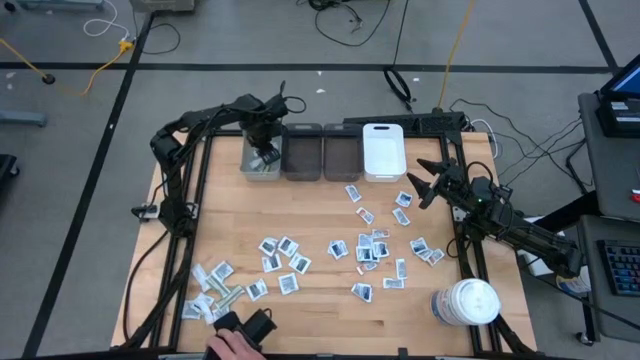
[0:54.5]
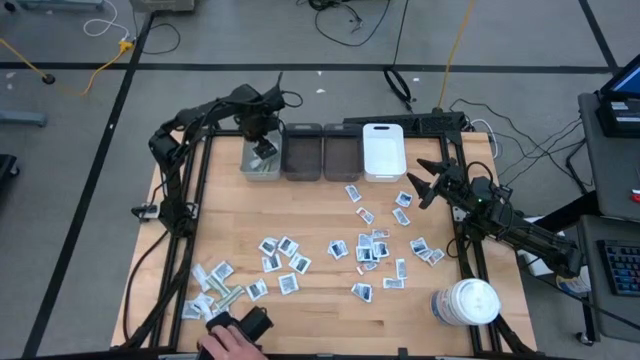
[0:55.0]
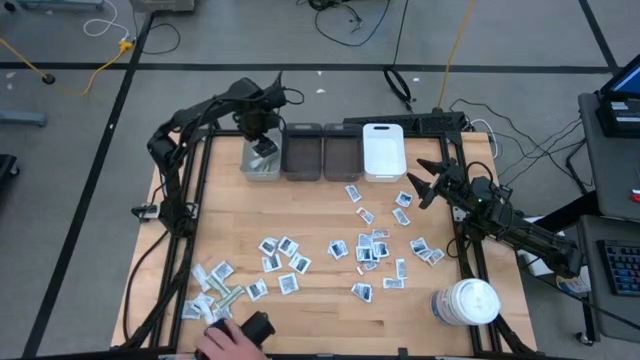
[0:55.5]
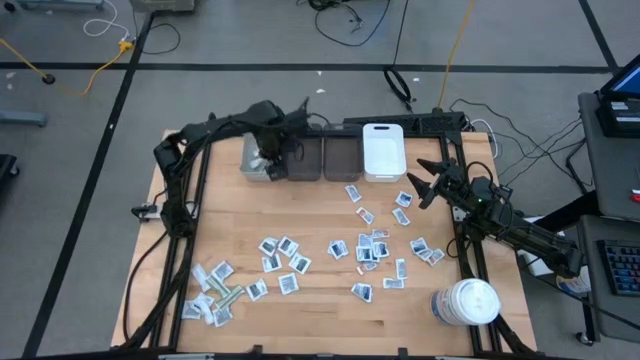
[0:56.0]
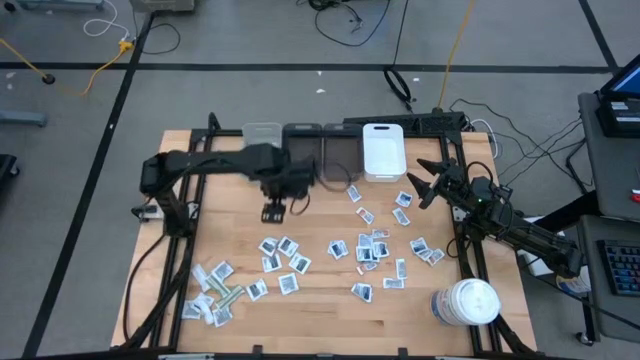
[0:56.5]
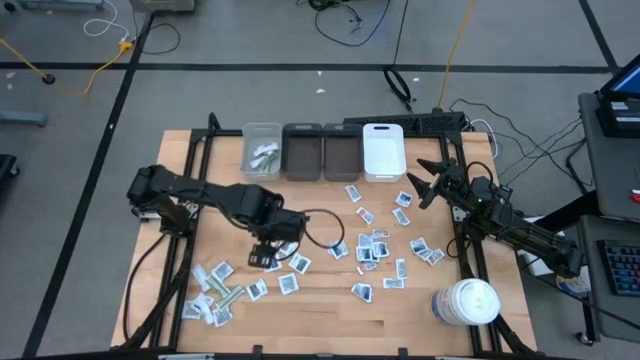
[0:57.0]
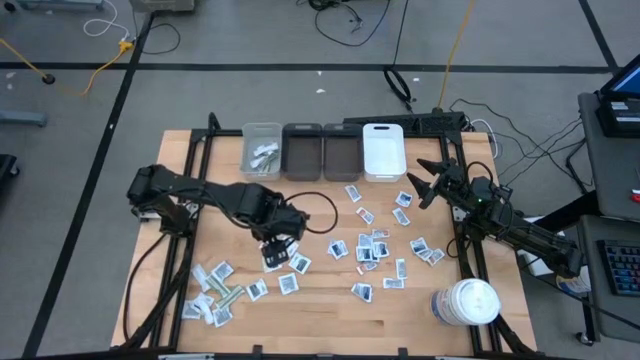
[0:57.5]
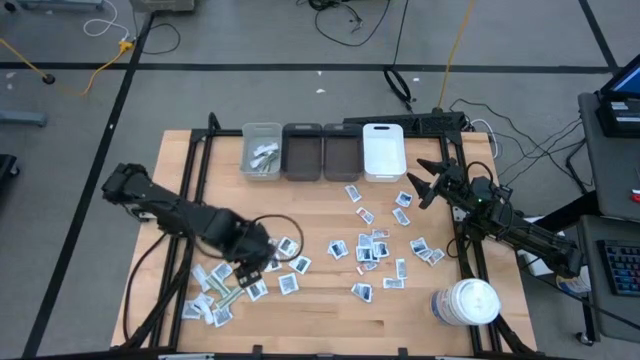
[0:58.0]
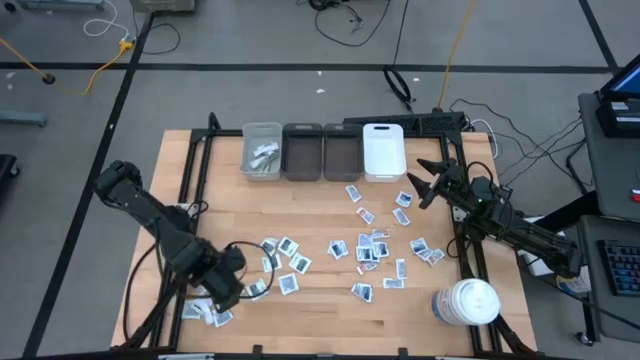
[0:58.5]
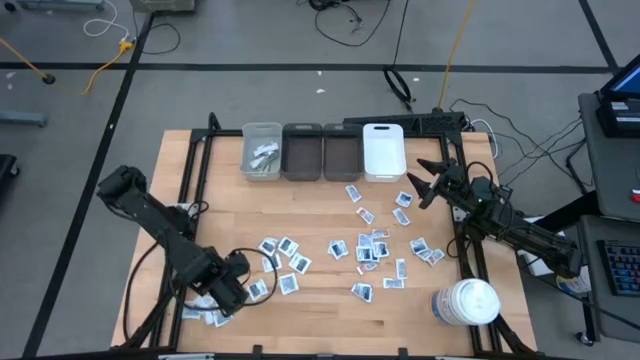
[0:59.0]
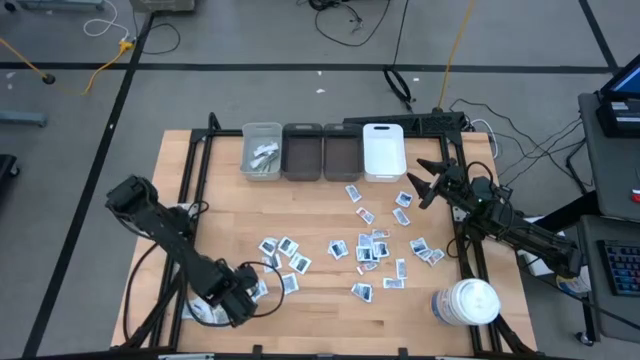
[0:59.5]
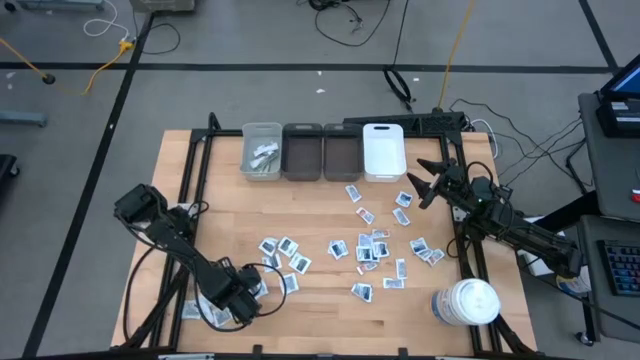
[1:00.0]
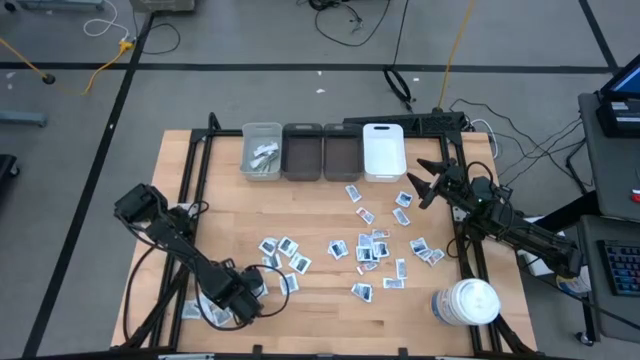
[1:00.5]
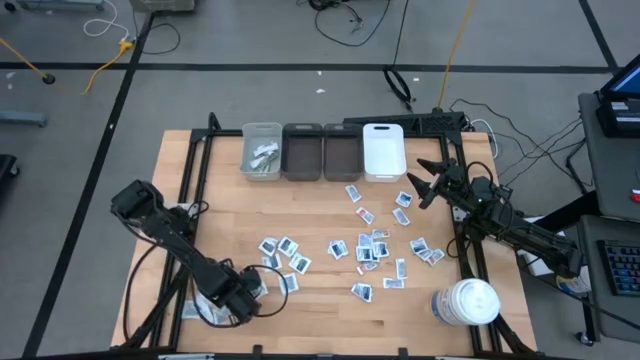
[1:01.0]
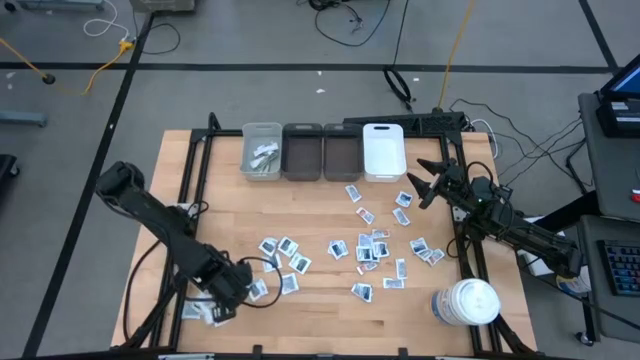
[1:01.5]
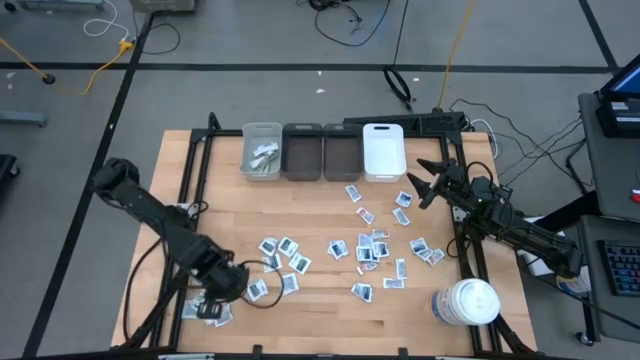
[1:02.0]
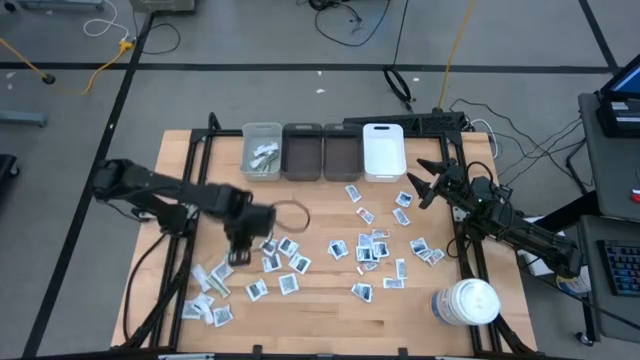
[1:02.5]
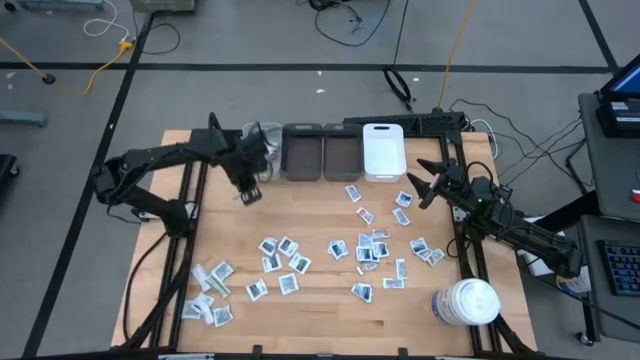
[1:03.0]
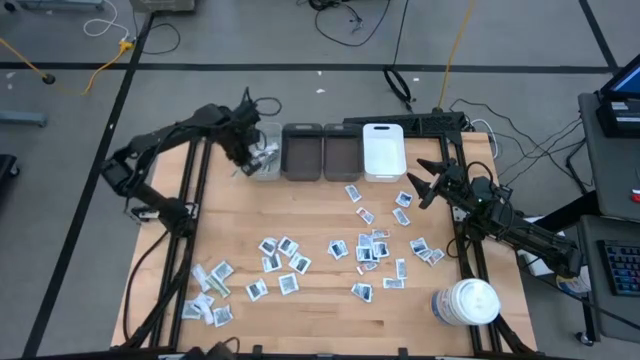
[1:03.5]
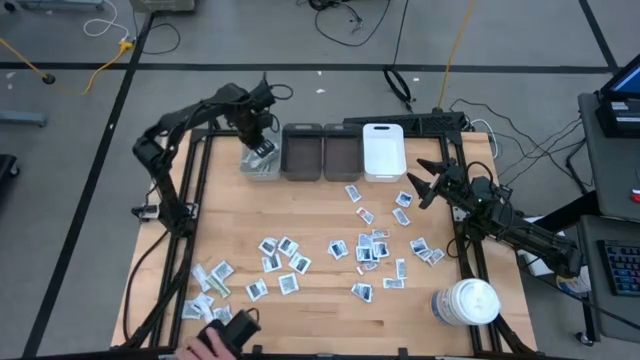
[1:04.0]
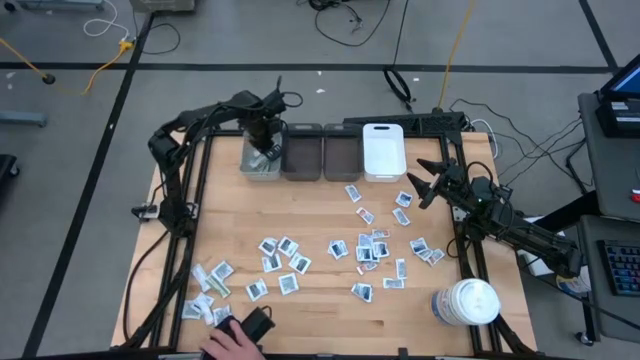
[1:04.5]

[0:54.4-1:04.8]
Task: Pick & Place First Aid Supplies
Put the bandage into the gray bin

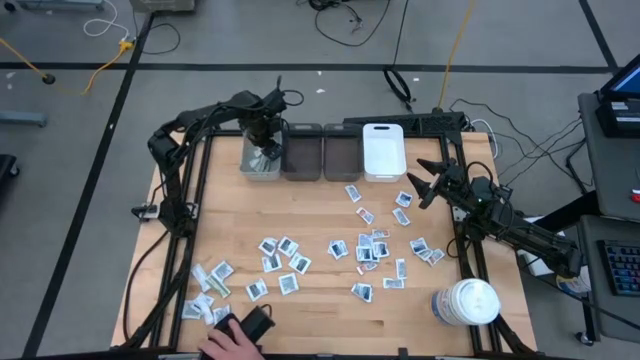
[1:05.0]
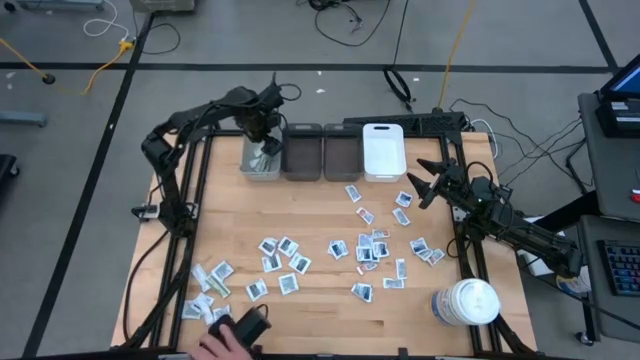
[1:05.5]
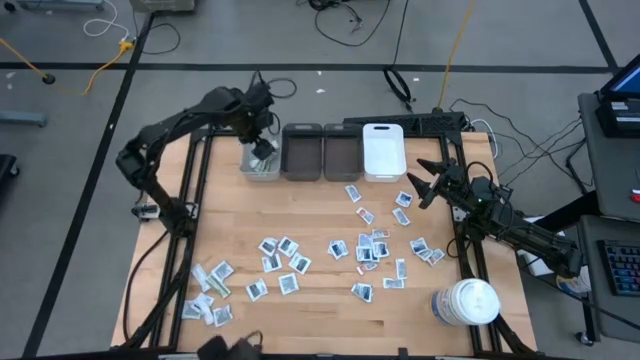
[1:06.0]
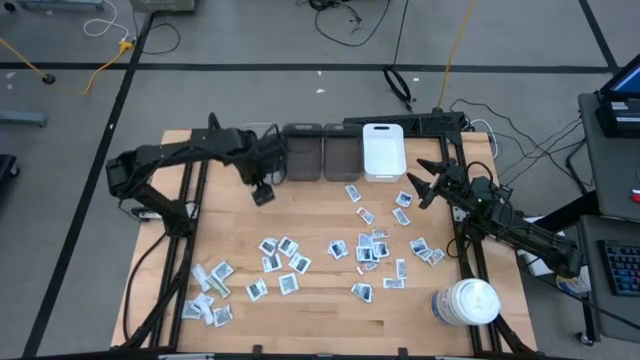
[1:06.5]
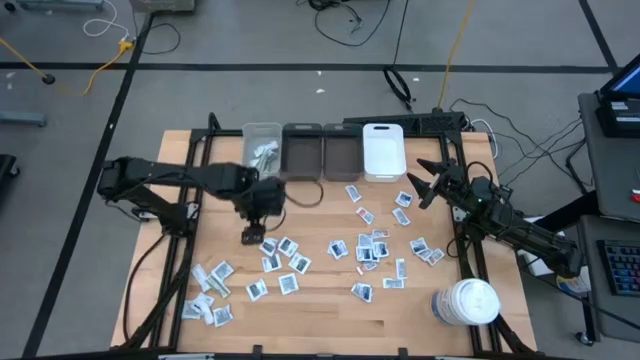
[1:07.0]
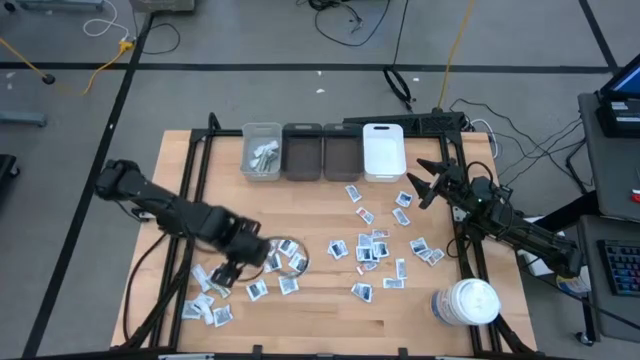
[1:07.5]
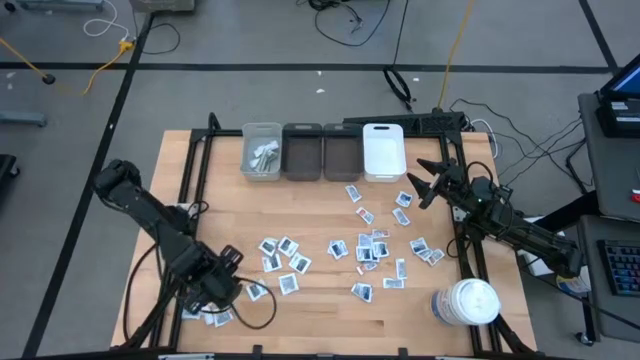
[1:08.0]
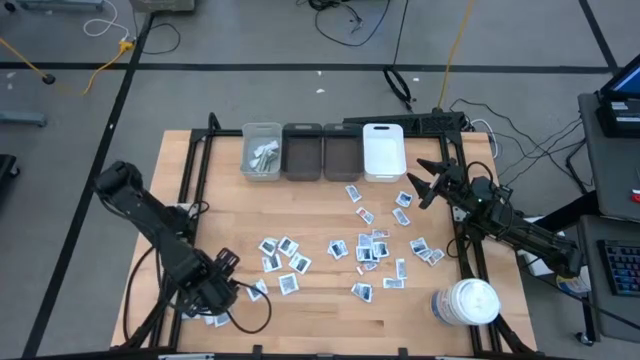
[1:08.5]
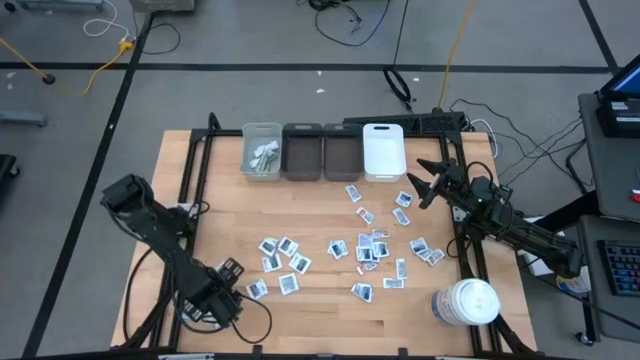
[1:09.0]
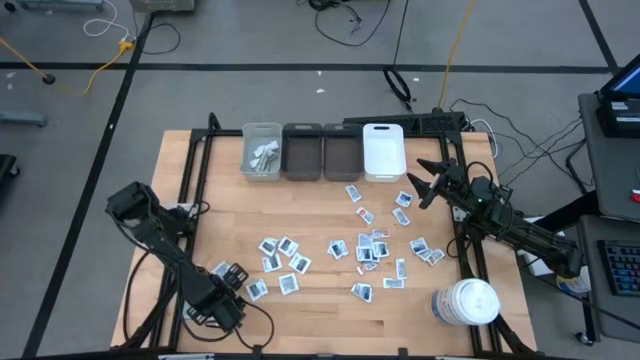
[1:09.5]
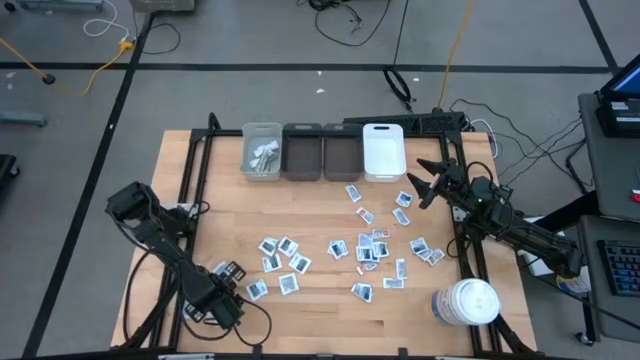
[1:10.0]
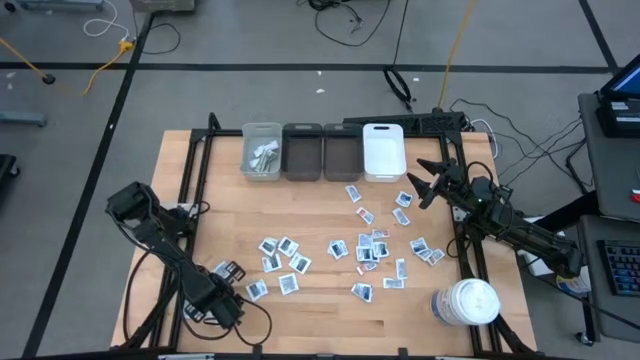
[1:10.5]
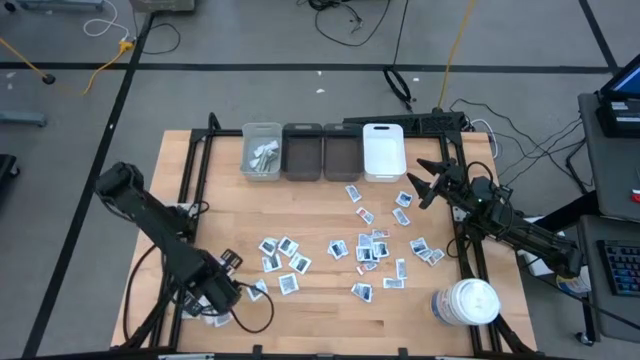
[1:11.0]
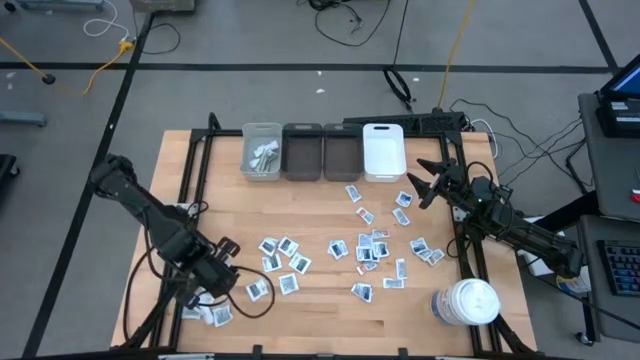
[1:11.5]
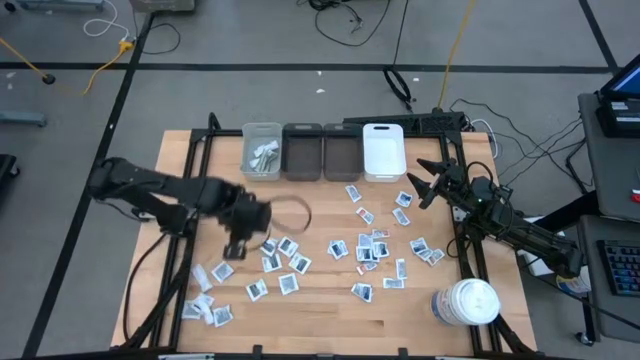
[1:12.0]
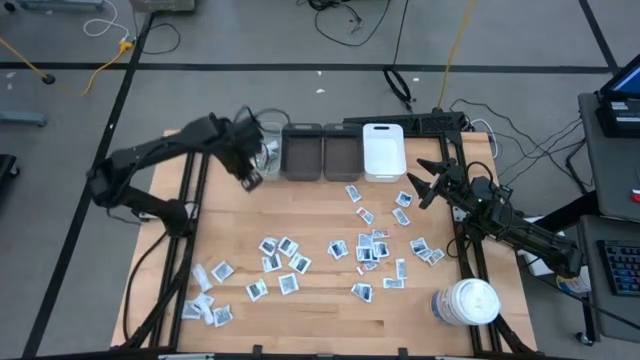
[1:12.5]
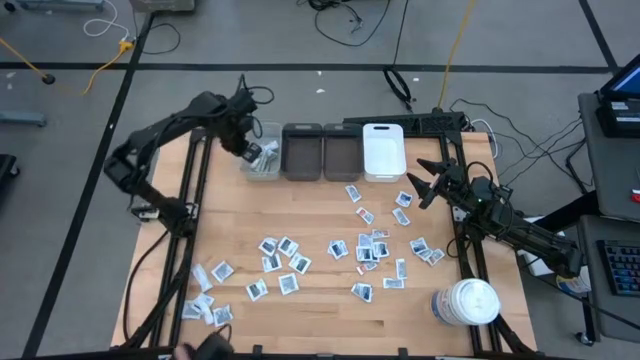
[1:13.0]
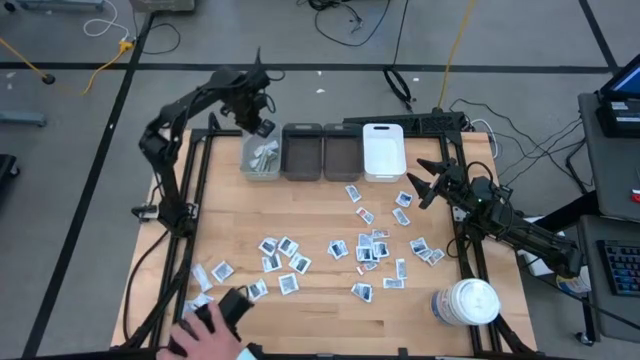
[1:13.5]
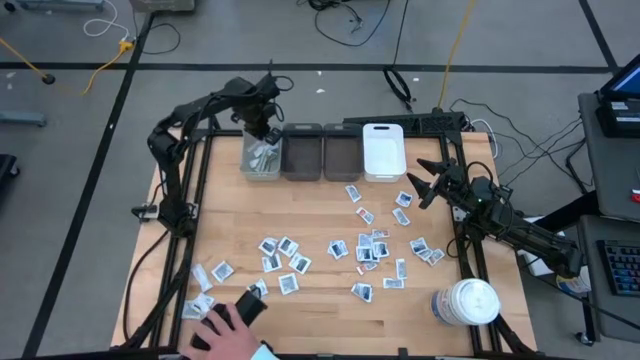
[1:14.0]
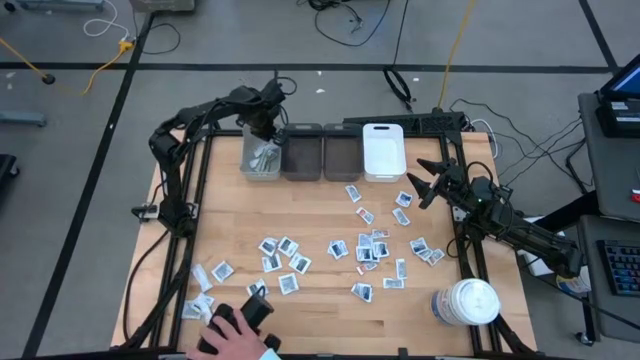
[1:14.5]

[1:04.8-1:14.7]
Put the bandage into the gray bin
